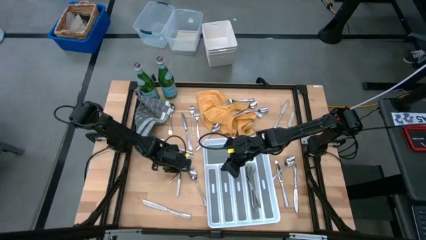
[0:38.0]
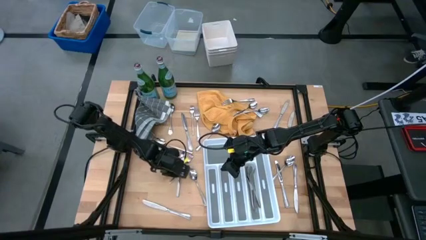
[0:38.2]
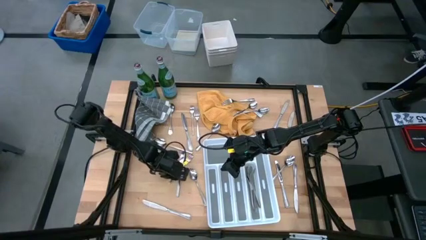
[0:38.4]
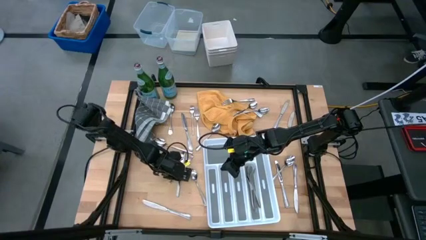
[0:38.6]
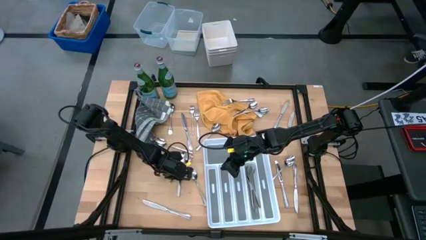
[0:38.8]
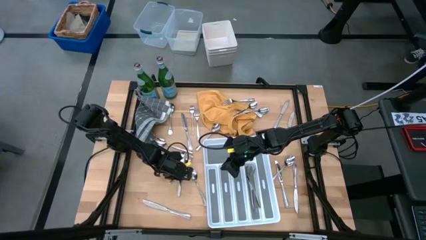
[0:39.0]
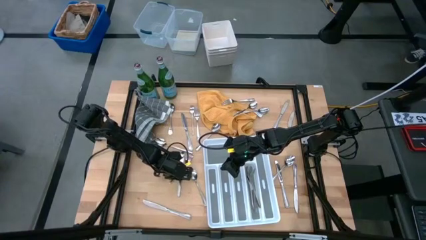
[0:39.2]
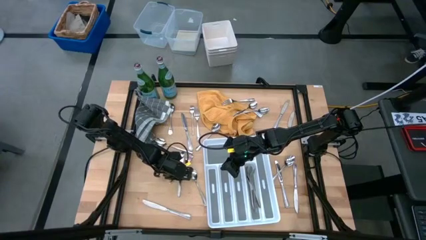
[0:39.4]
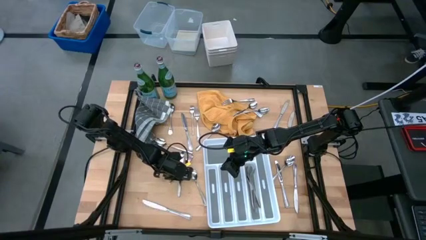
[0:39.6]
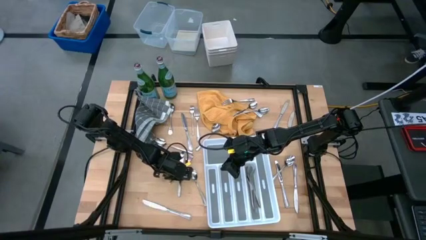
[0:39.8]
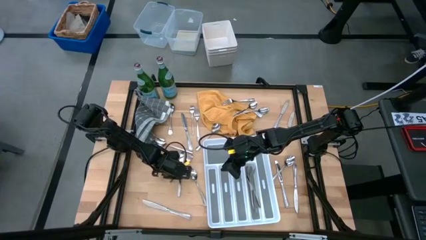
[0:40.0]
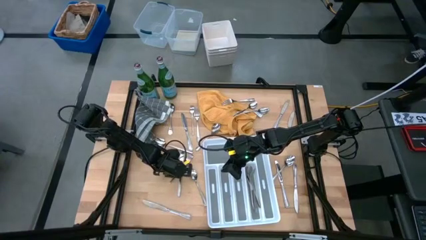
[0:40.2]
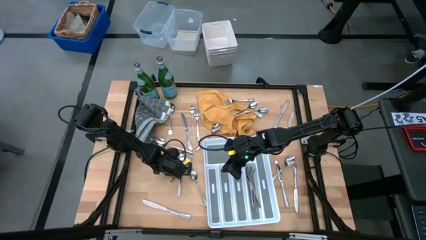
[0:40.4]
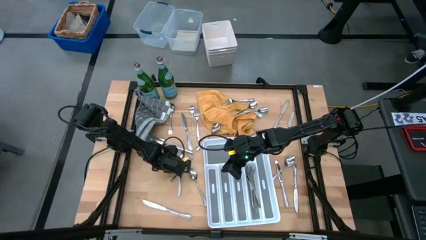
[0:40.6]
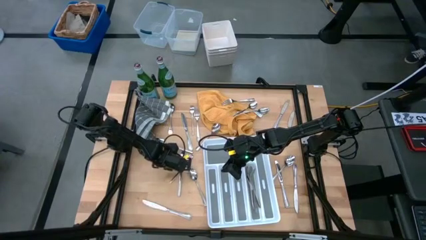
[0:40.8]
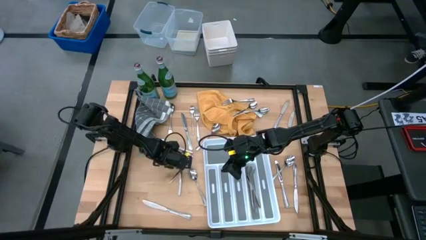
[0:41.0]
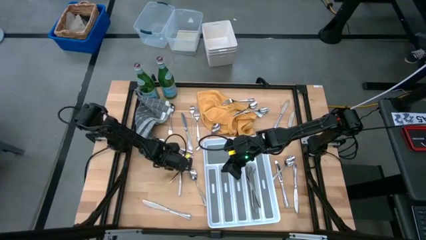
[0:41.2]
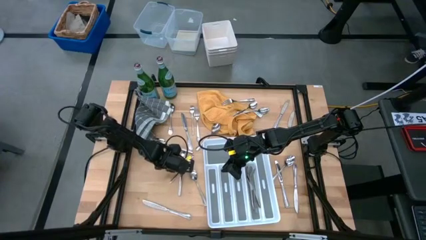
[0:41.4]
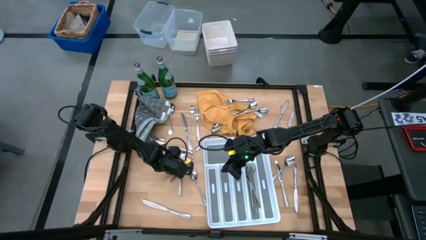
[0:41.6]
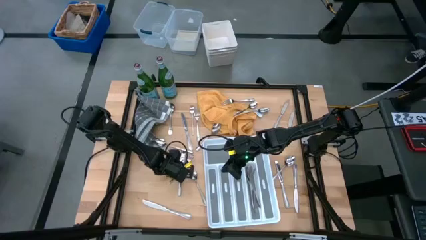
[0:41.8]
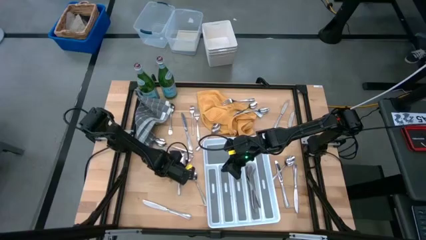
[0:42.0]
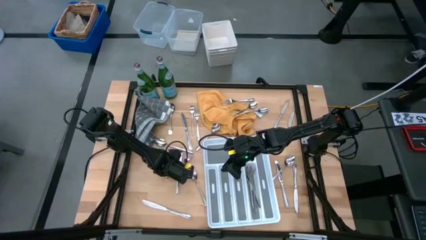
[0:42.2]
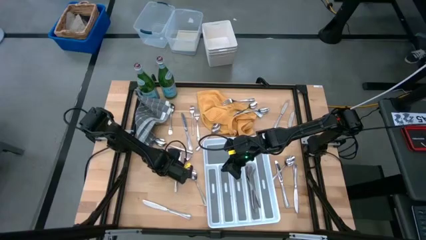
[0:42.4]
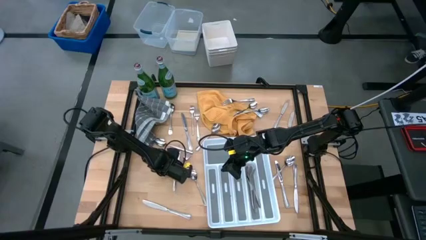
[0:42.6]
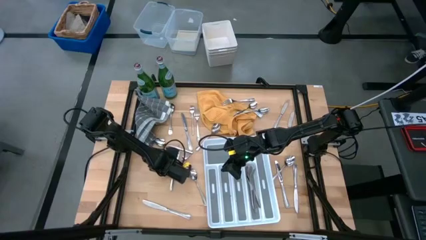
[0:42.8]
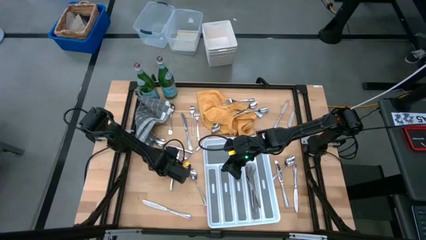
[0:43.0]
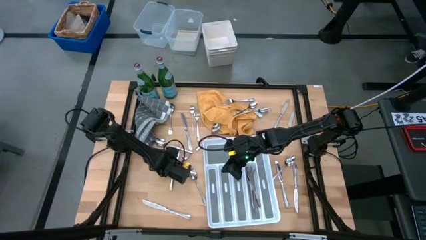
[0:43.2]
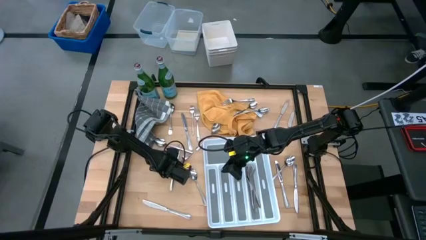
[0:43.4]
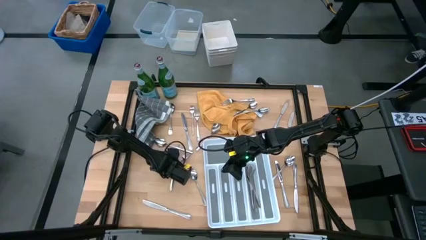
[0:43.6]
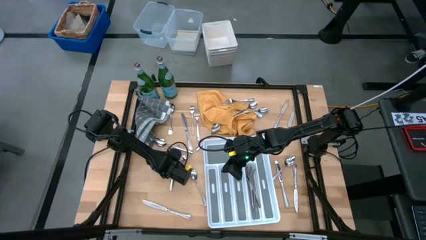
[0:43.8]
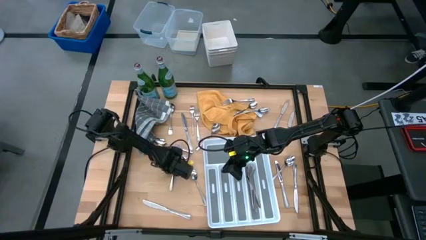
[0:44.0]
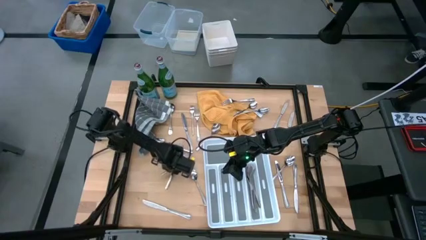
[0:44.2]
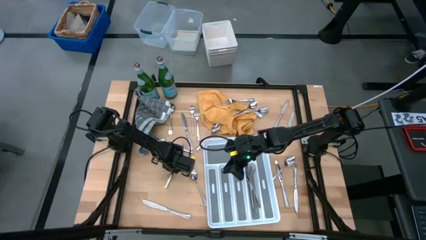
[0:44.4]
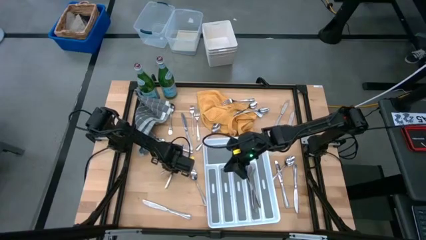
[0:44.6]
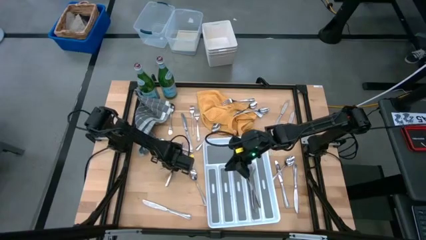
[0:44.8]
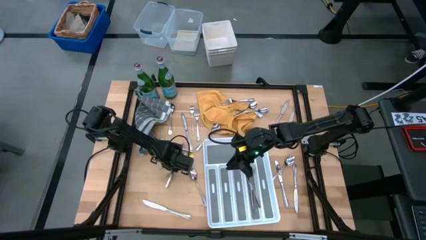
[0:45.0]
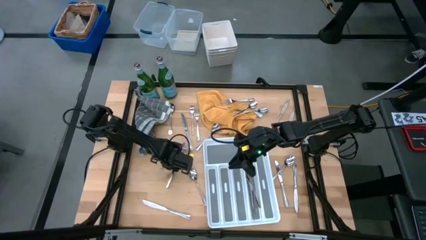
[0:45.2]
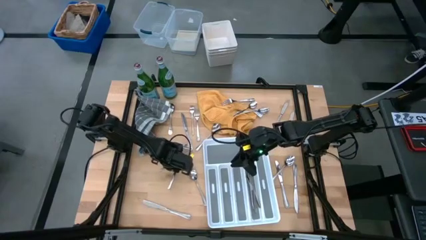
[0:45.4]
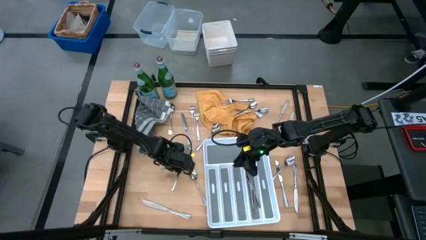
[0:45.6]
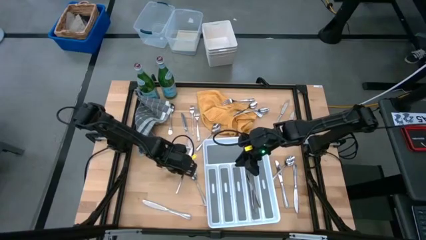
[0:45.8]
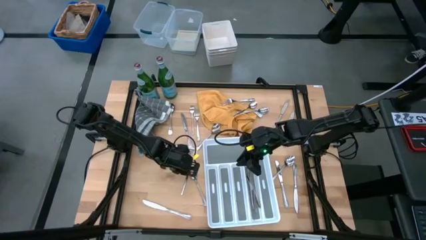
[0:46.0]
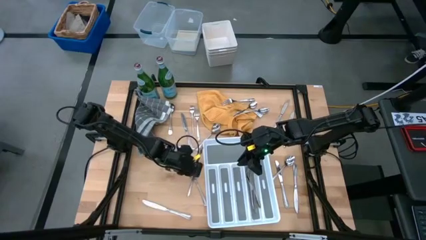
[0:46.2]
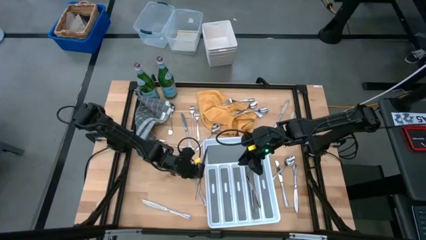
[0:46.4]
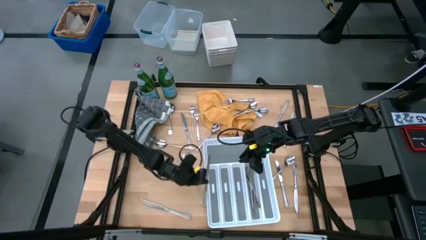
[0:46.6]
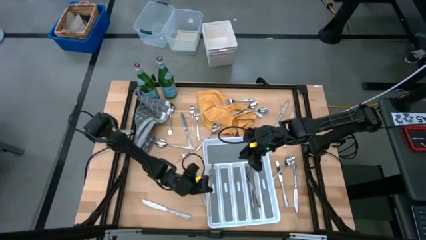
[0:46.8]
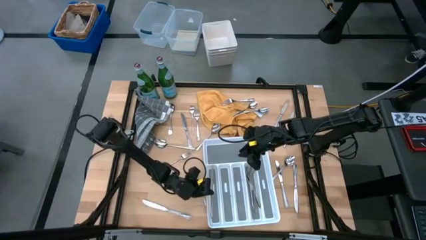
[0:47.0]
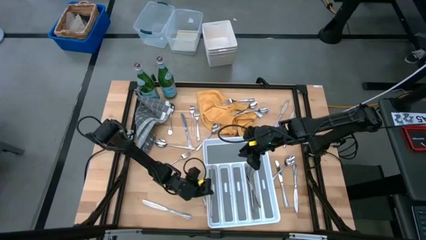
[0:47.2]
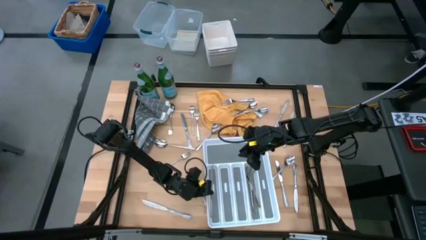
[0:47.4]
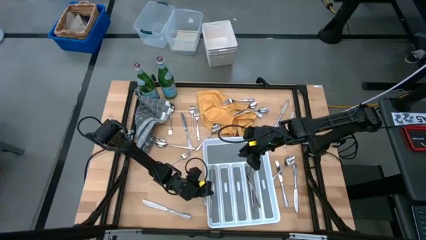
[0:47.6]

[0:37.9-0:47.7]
Task: Sort silverware
Put the table knife into the silverware tray

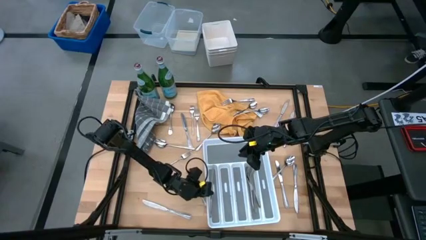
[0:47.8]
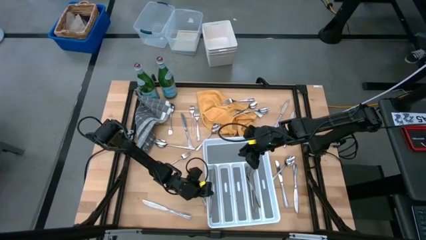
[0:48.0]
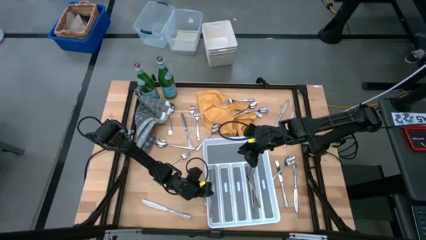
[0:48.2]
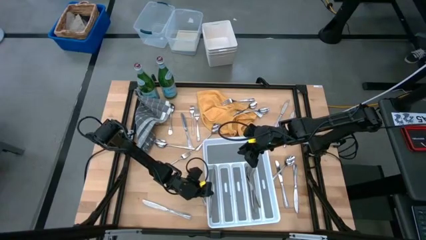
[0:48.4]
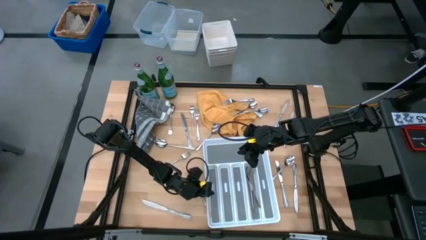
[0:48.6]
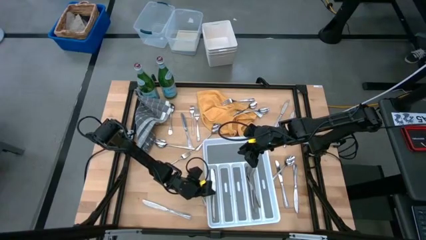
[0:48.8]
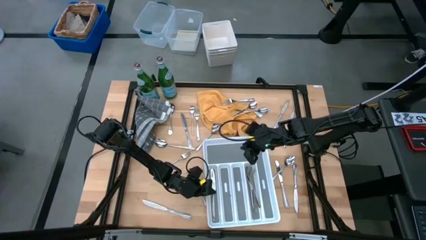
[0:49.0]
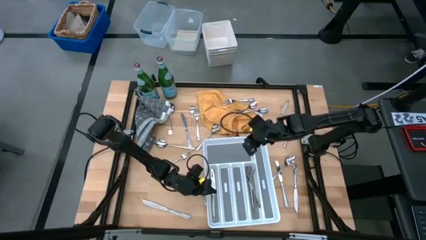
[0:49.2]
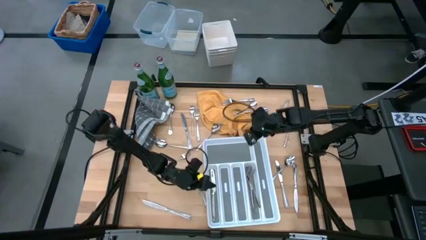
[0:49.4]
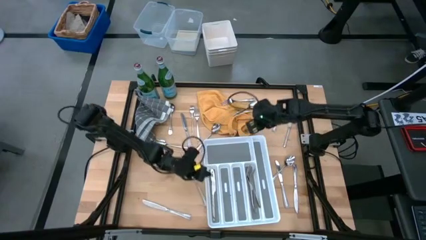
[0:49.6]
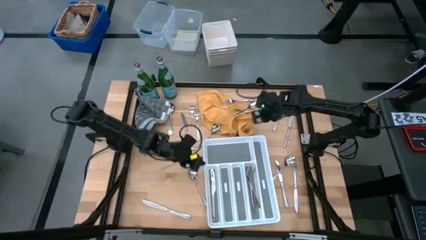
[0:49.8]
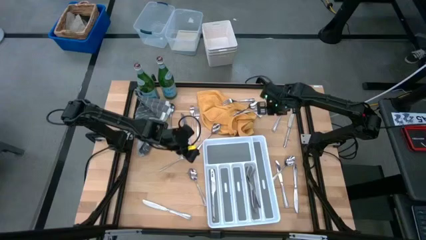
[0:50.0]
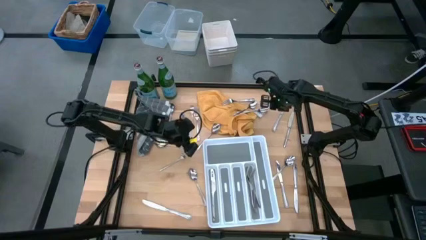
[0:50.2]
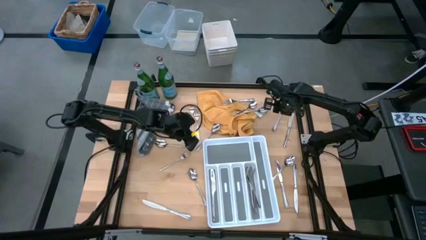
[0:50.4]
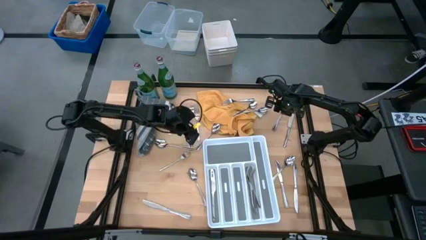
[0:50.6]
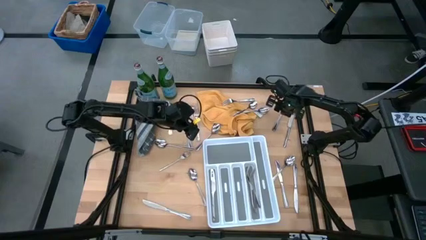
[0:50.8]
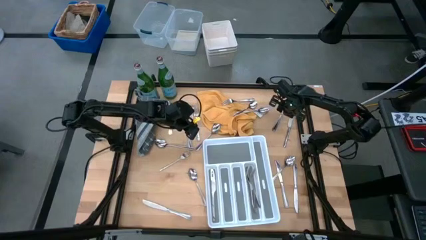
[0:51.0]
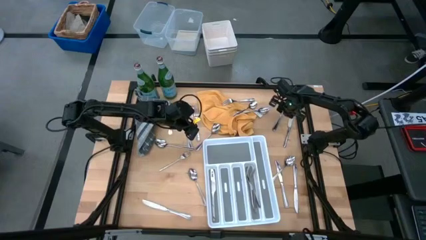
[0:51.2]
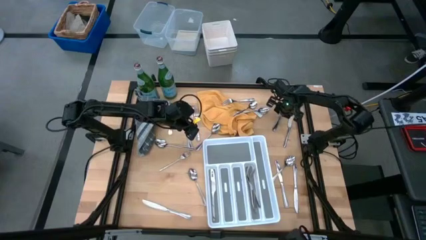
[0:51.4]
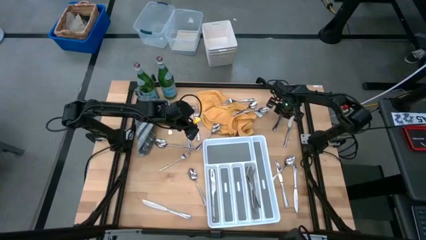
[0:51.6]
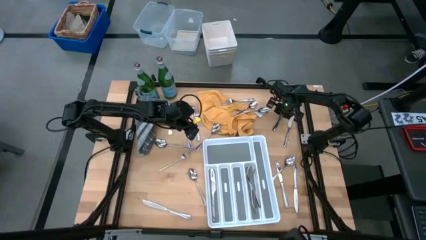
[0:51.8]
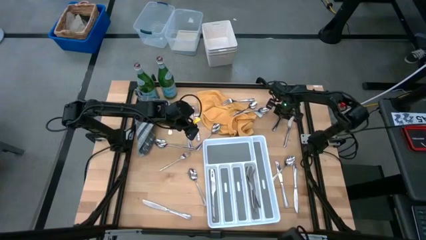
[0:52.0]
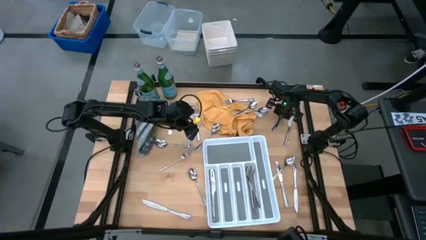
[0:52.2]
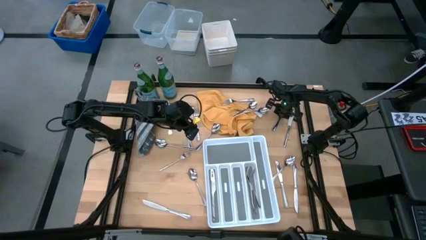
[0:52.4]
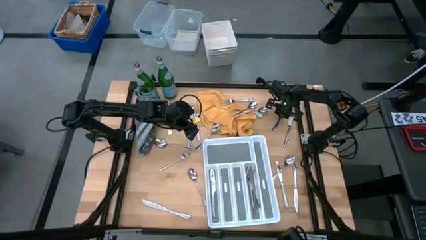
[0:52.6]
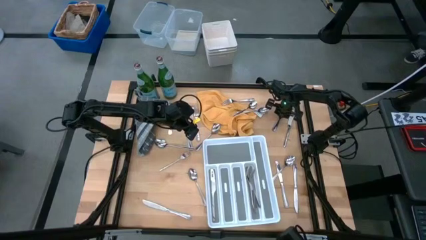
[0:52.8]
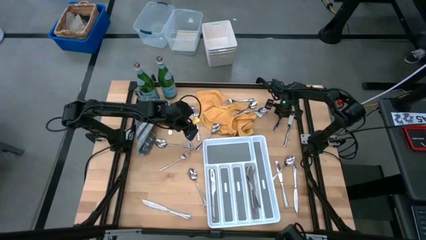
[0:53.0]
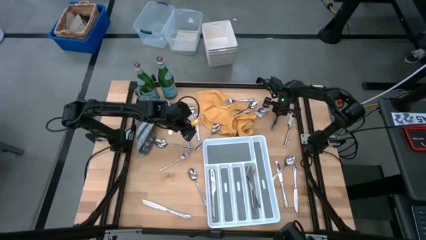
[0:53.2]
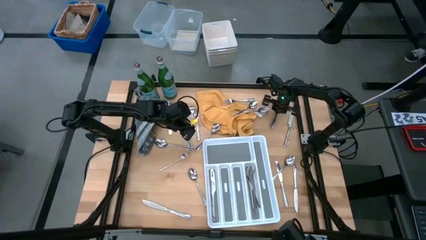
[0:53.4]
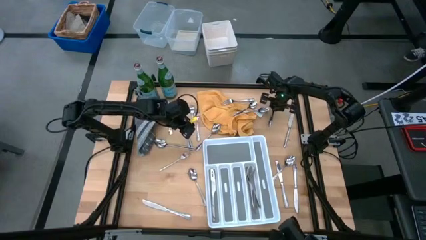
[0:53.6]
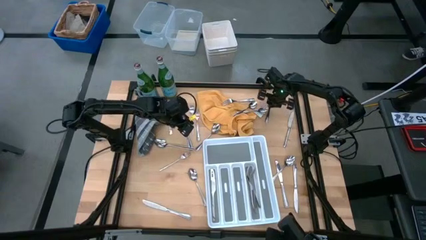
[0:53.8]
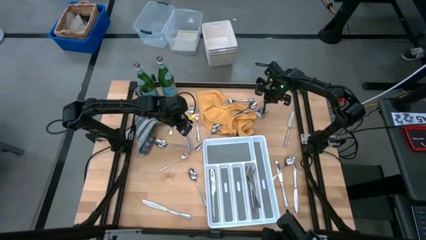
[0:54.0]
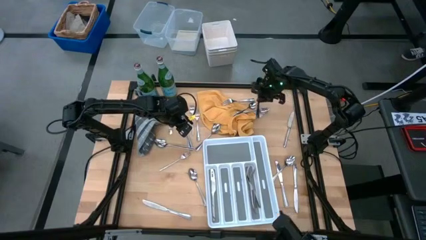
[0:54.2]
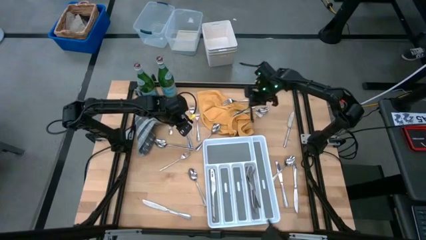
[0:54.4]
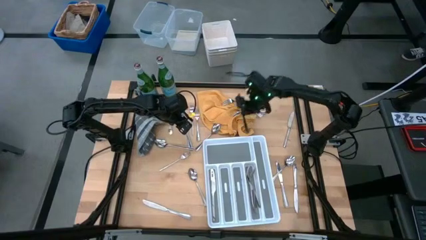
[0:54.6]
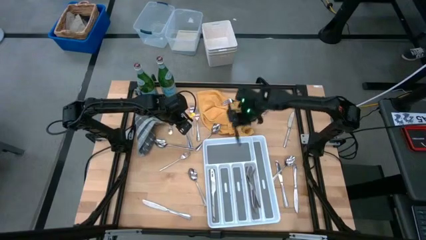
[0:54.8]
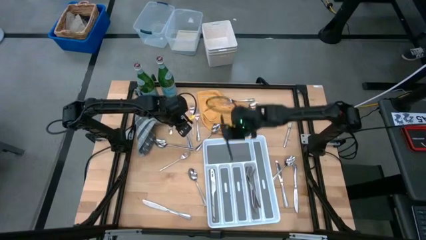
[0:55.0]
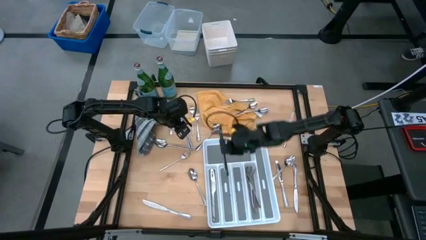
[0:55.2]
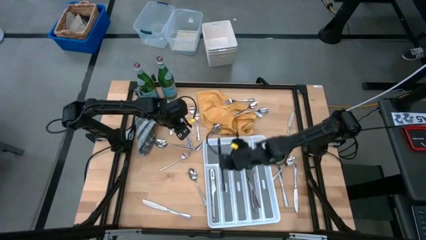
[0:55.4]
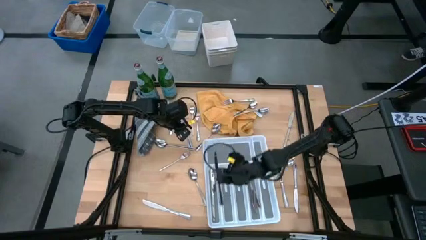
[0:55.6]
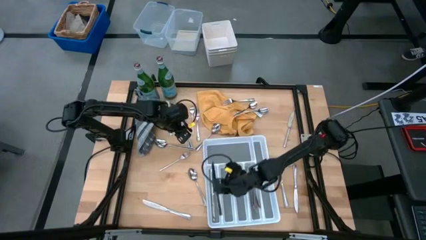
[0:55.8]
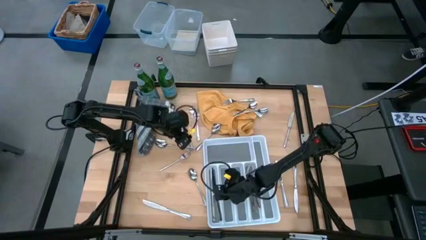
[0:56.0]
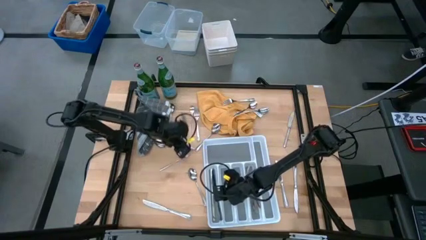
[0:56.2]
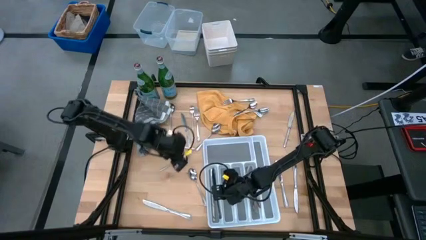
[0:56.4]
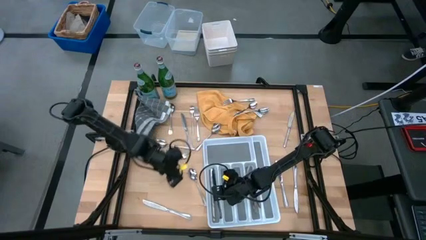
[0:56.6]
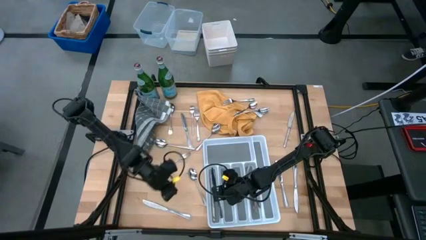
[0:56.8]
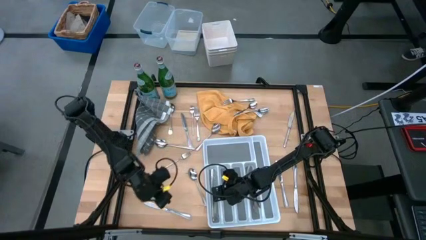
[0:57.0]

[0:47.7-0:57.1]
Put the table knife into the silverware tray
